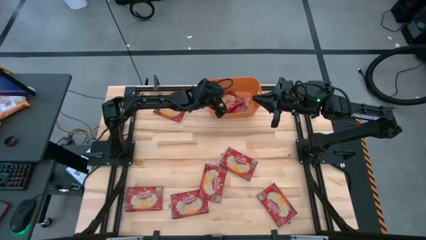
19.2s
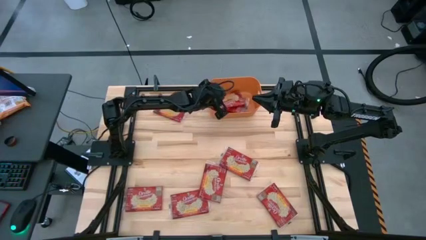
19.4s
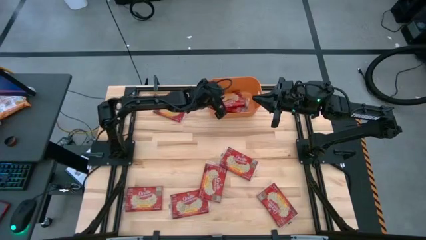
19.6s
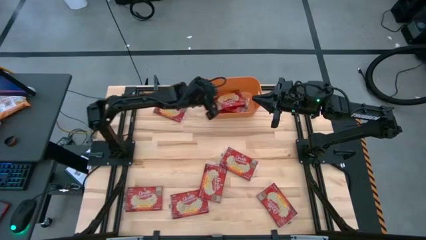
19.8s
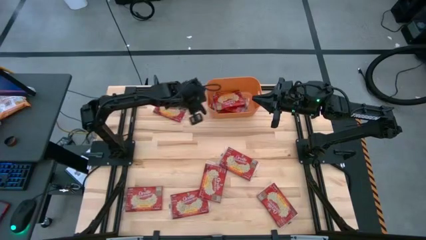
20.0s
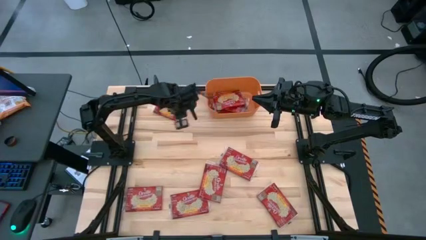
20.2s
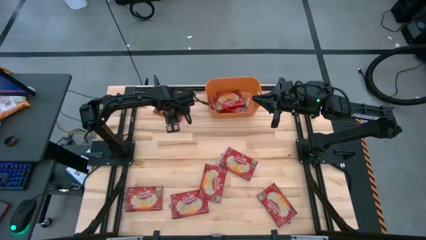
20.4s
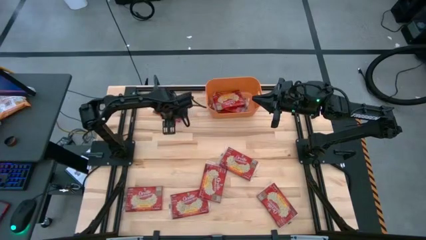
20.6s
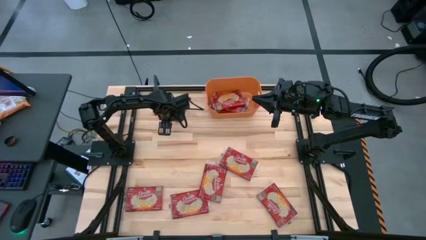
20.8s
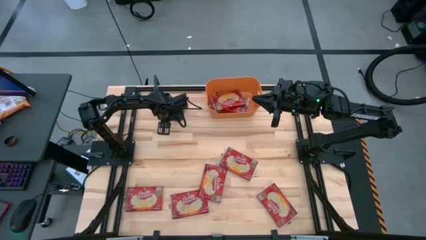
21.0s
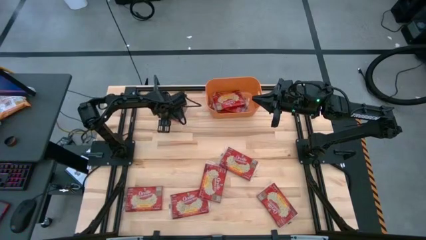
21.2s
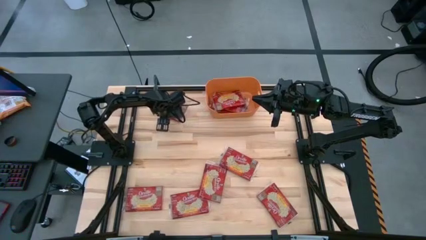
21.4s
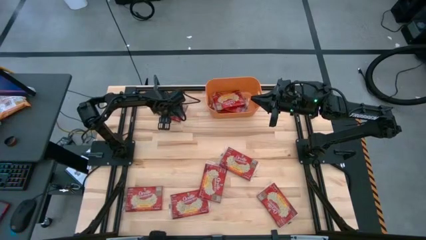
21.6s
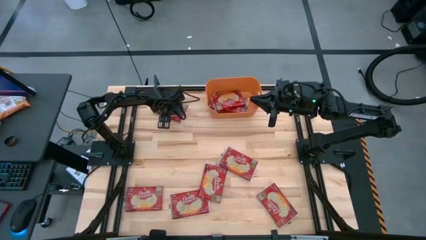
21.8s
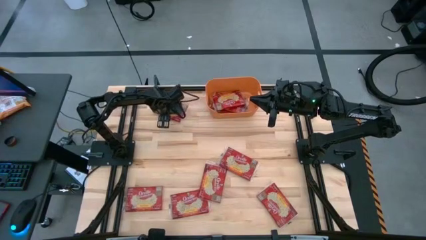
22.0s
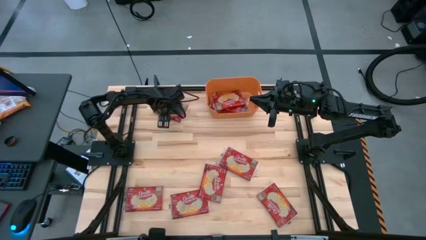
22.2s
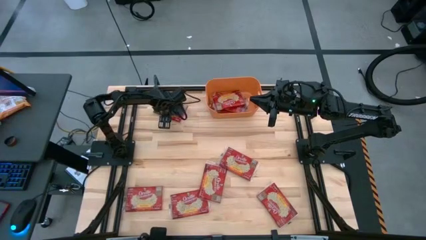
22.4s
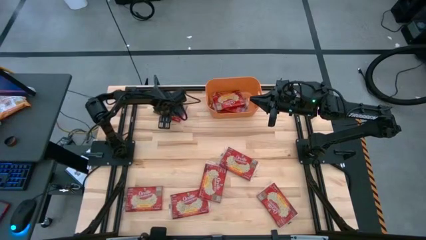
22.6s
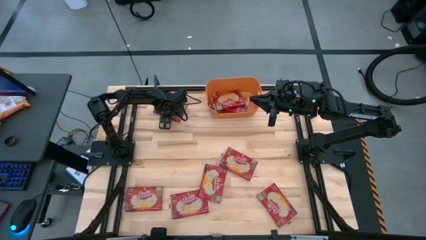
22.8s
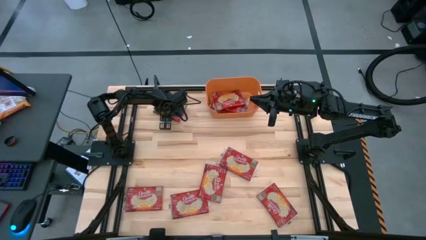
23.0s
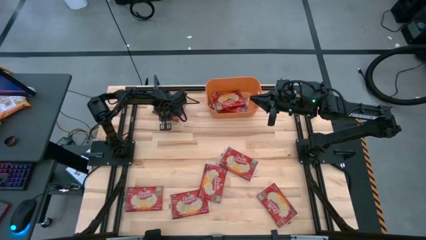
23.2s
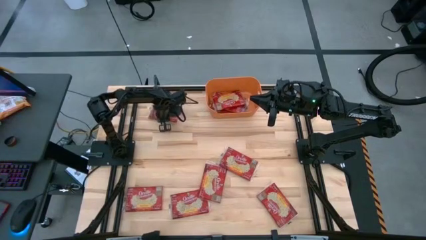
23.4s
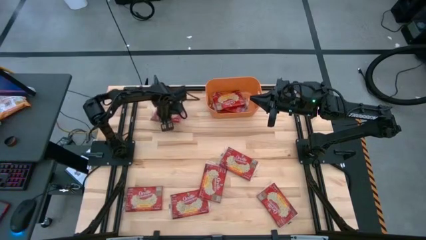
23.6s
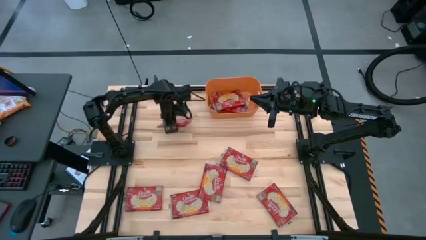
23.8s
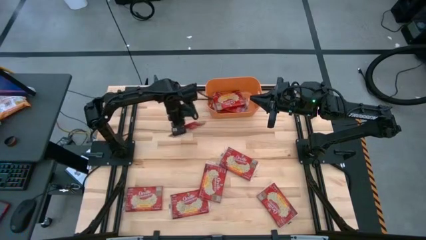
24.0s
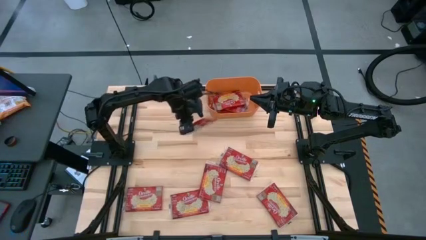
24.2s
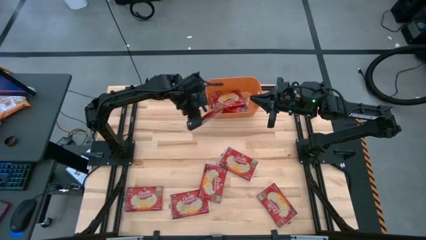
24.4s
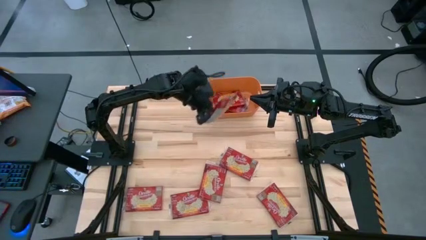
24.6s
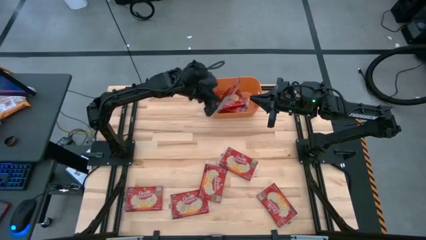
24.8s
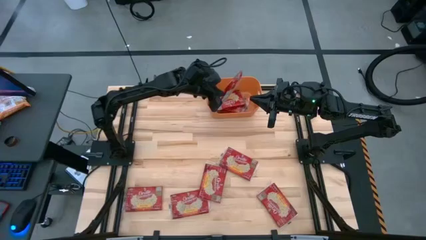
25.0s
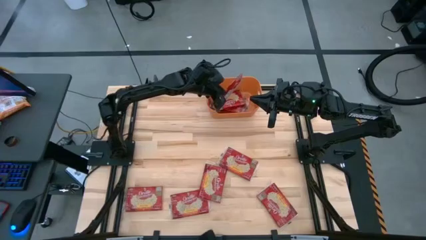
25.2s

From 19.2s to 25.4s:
Task: Sort popcorn bags into baskets
Put the popcorn pack into the orange bin

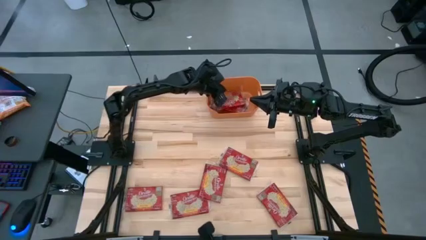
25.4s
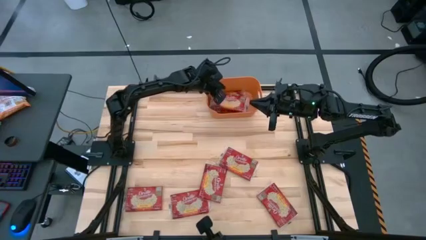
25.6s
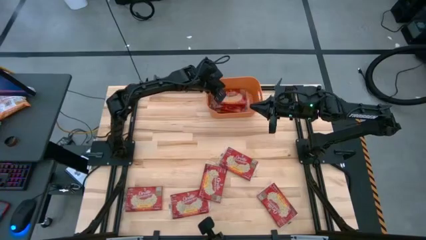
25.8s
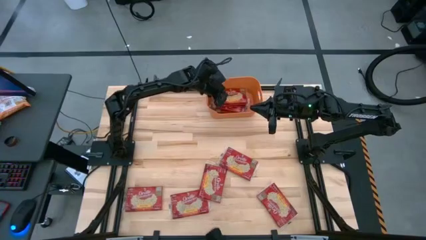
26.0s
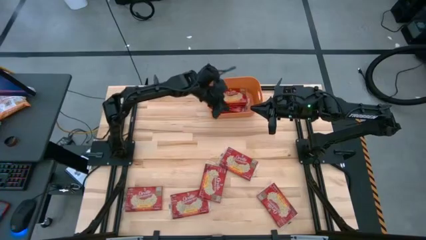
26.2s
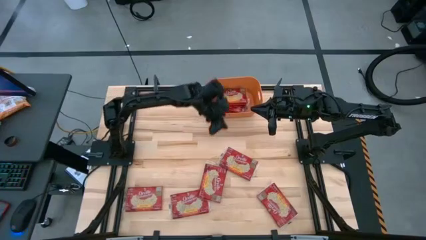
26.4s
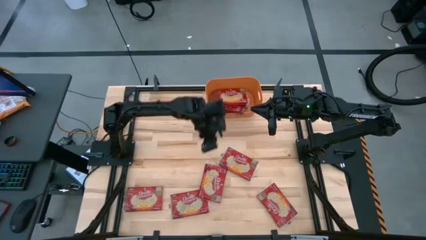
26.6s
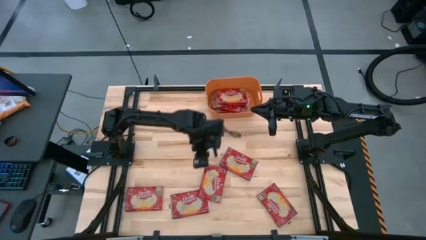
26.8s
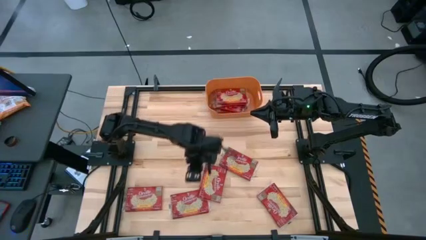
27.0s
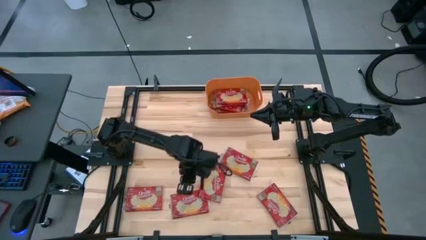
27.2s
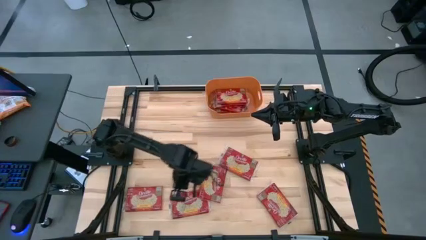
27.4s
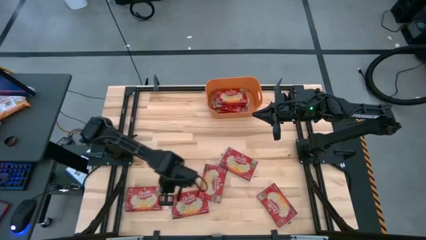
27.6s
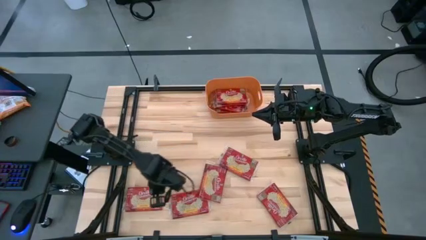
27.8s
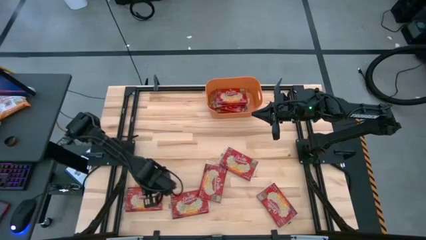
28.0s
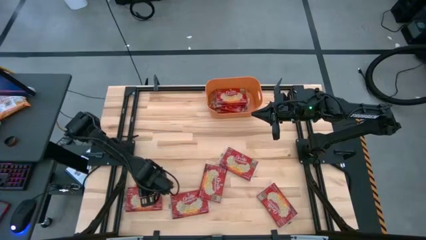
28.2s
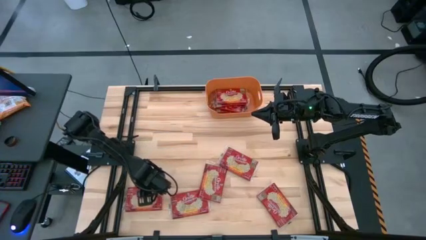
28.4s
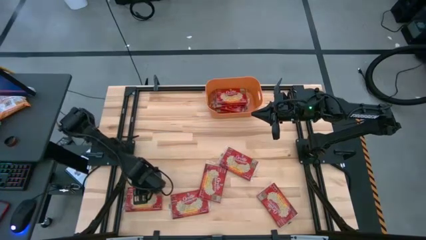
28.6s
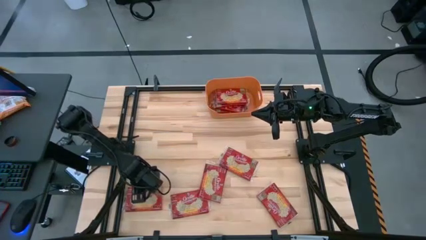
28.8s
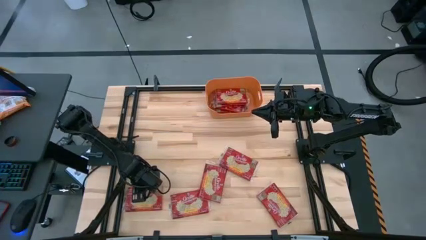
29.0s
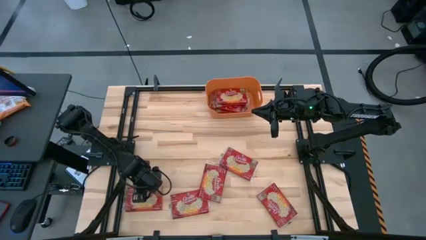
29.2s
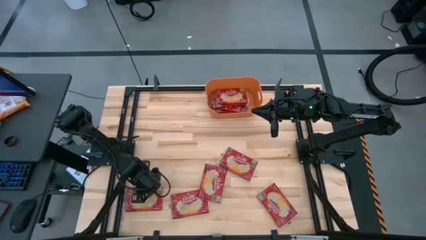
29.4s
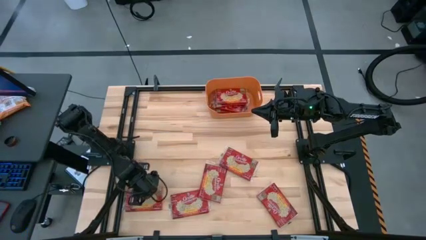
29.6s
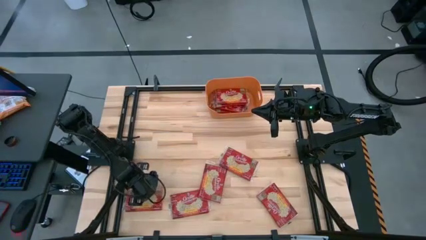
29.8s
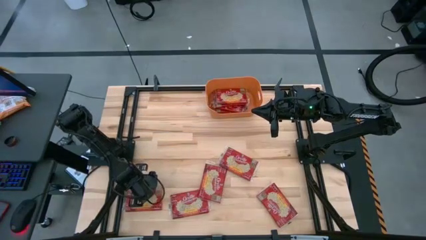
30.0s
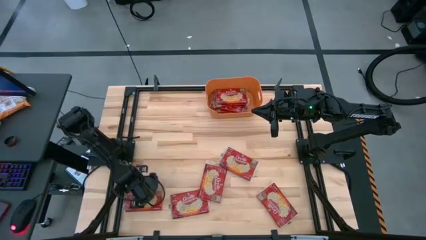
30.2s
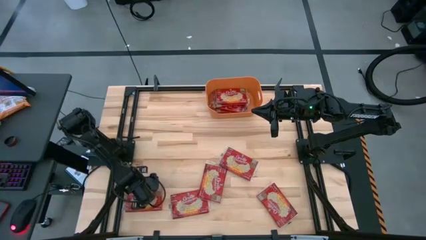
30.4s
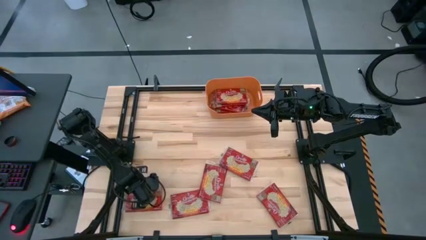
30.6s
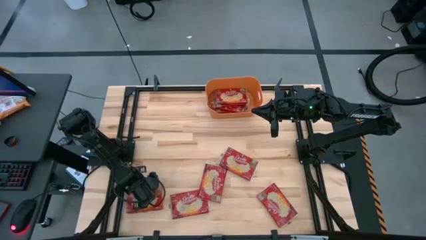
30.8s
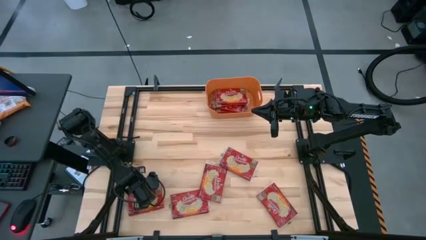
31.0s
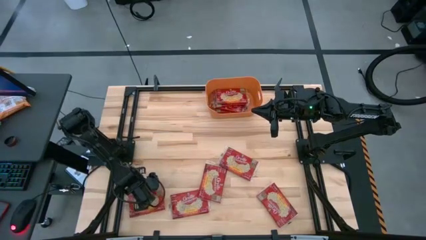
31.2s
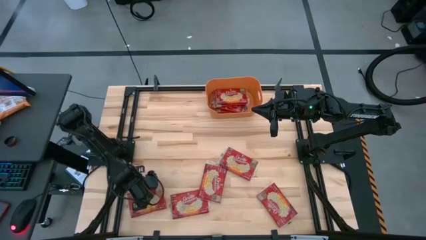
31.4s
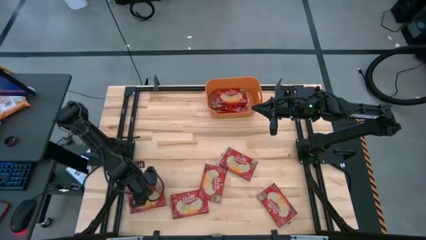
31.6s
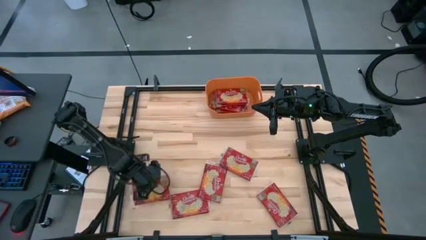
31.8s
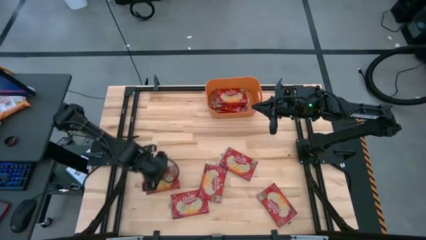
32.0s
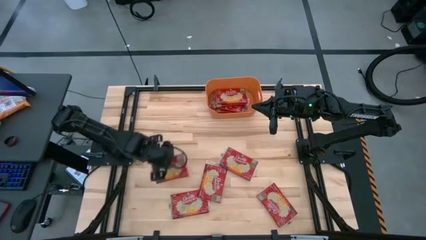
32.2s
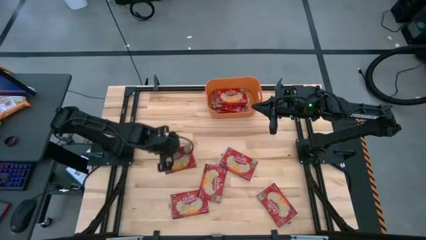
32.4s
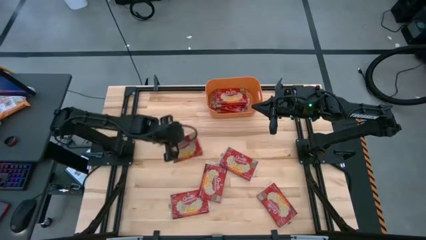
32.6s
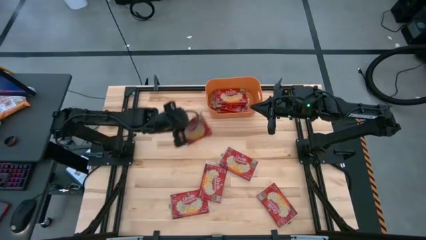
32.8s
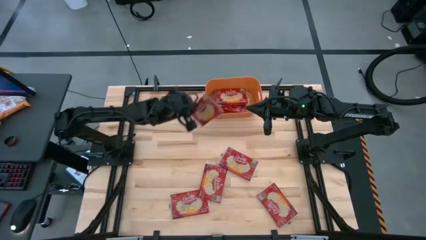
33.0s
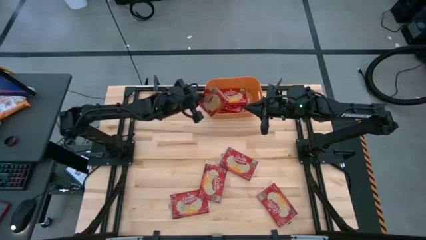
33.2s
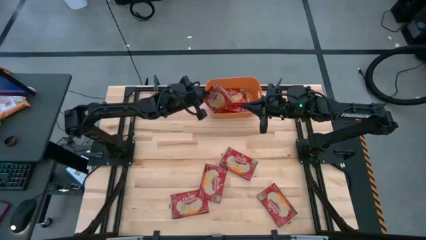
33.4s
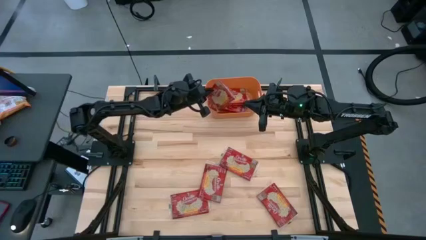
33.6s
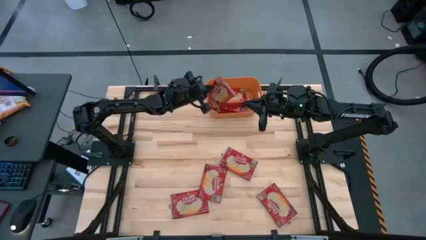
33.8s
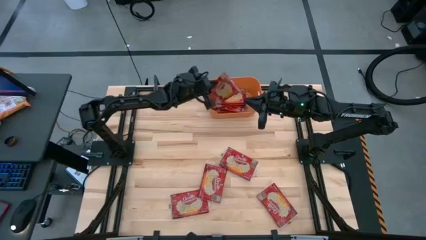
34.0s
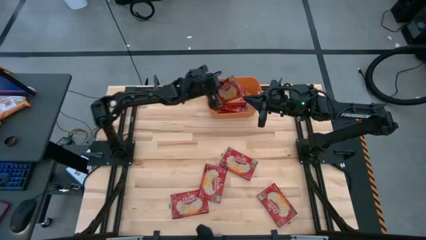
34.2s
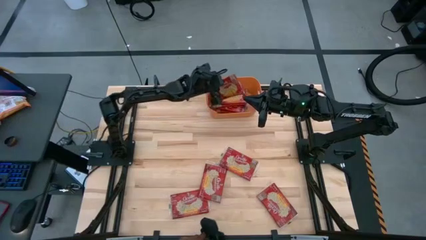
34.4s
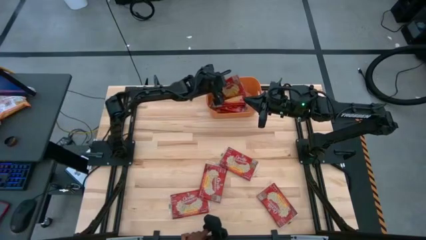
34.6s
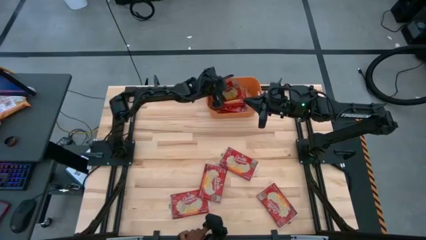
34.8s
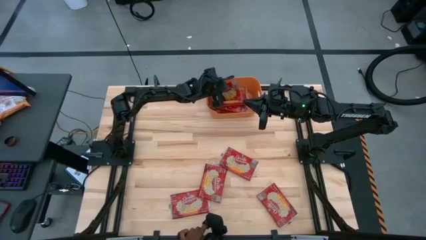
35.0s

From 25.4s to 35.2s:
Put the popcorn pack into the orange bin

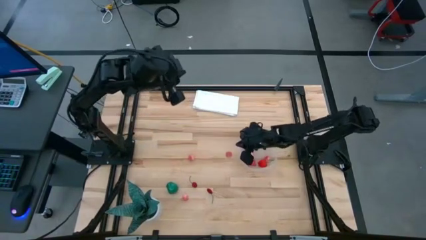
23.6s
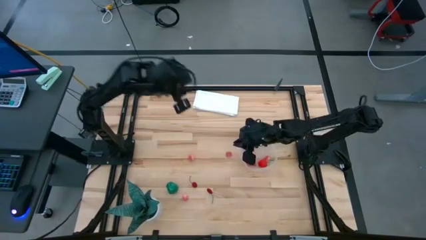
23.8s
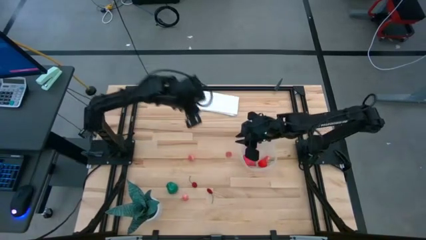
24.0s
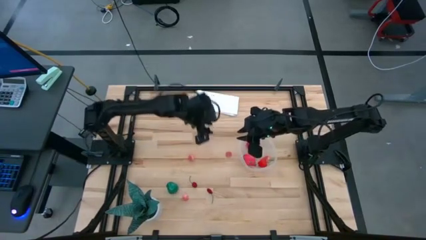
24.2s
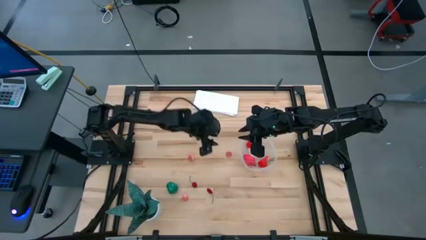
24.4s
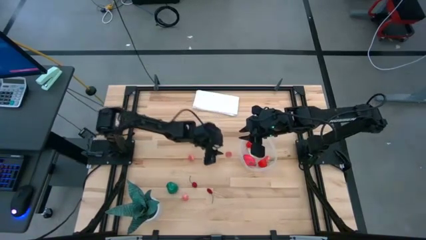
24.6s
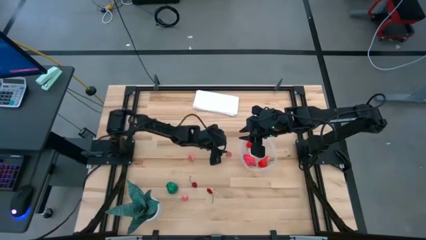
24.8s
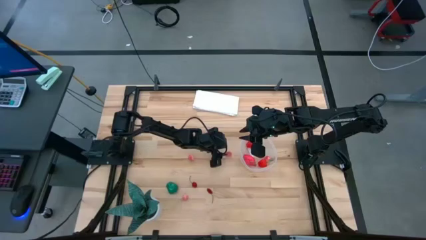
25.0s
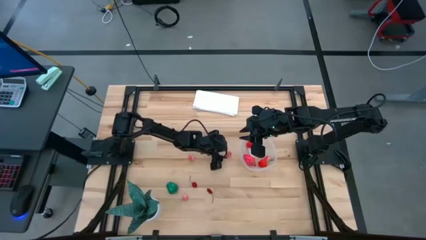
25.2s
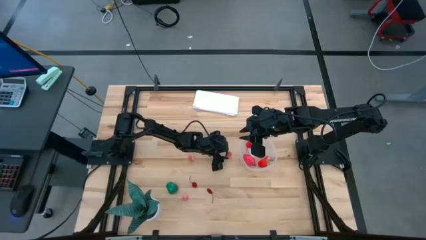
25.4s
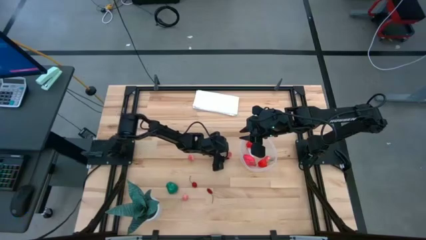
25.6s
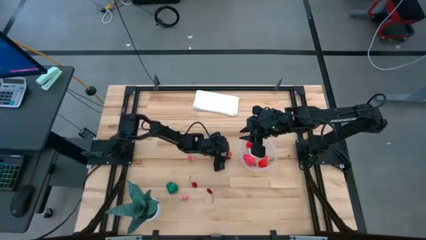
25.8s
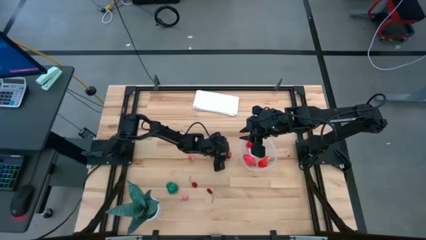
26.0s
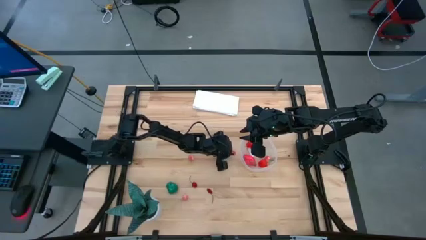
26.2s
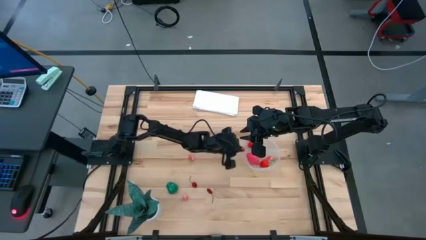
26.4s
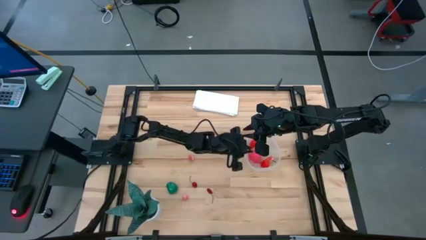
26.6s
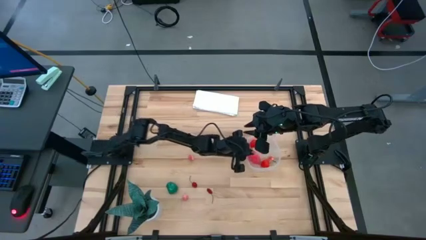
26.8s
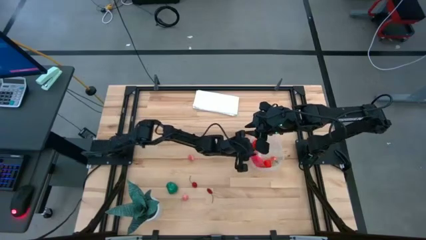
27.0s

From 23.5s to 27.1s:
Task: Pick and placing Produce into tupperware
Put the pink peach into the transparent bin
